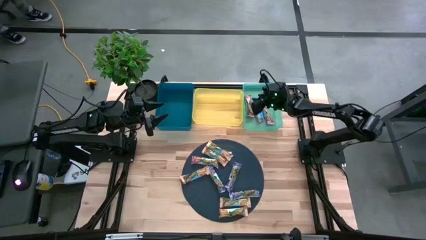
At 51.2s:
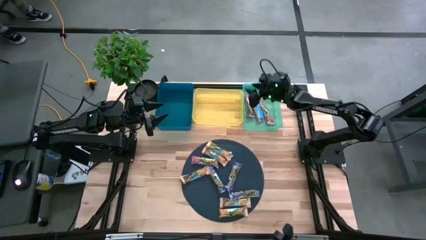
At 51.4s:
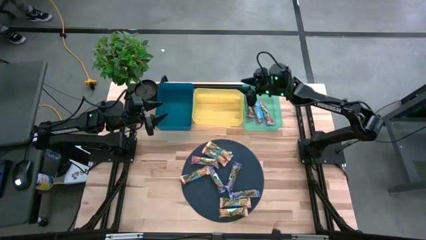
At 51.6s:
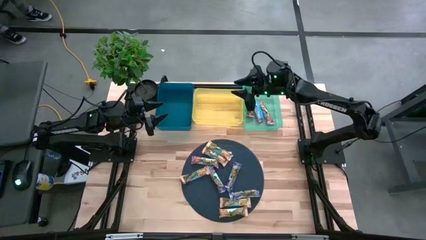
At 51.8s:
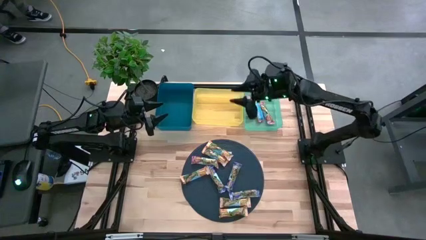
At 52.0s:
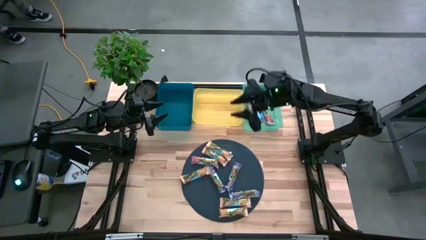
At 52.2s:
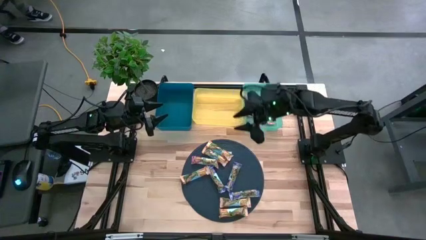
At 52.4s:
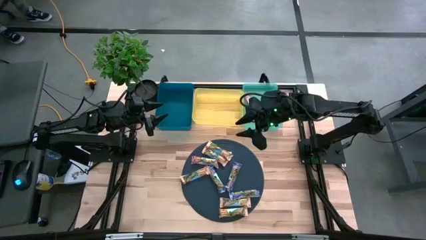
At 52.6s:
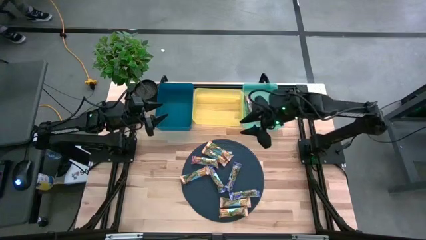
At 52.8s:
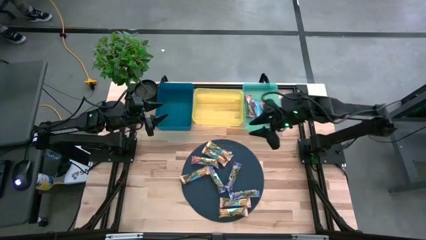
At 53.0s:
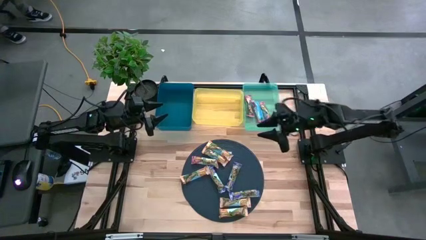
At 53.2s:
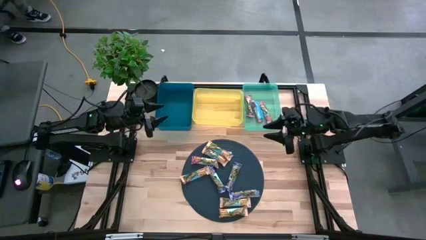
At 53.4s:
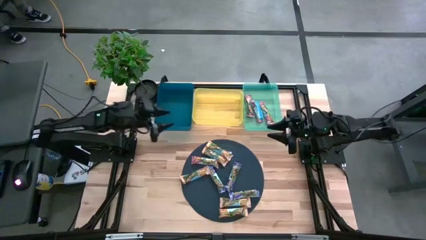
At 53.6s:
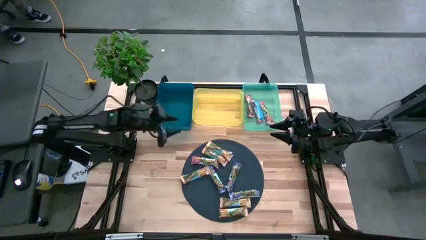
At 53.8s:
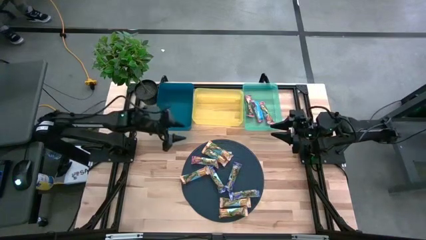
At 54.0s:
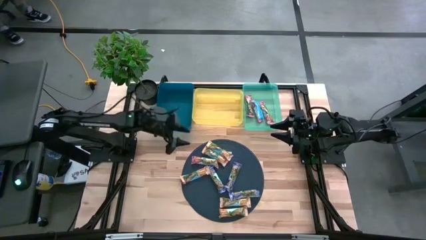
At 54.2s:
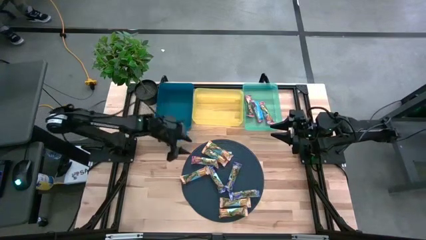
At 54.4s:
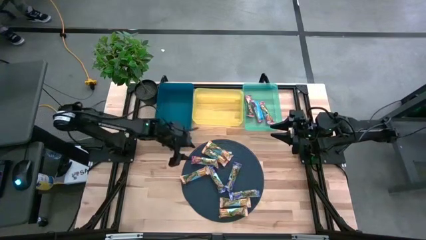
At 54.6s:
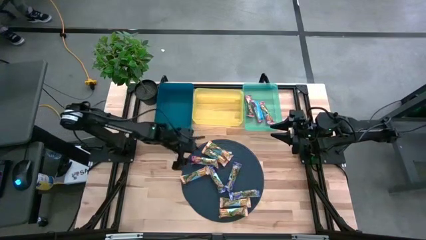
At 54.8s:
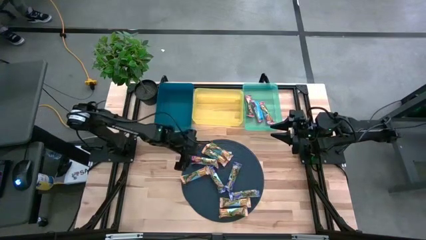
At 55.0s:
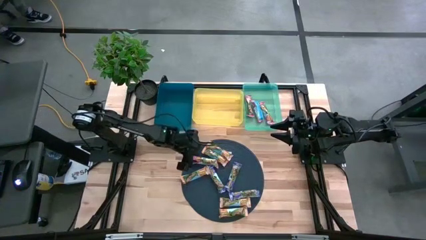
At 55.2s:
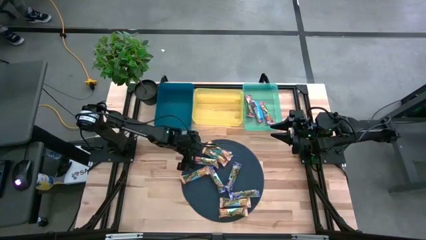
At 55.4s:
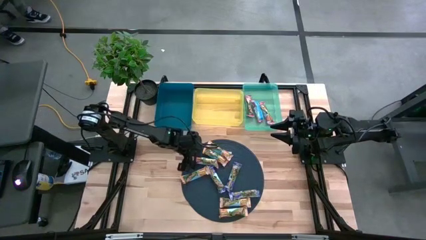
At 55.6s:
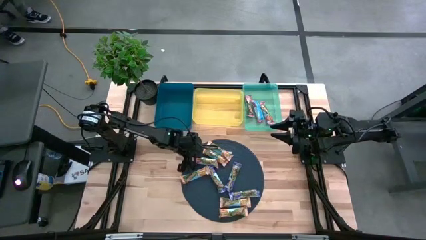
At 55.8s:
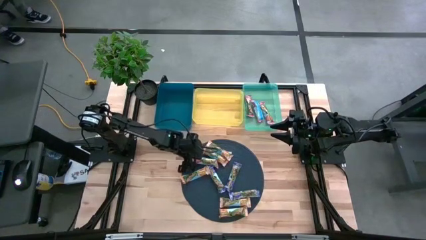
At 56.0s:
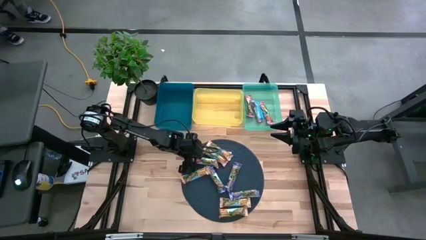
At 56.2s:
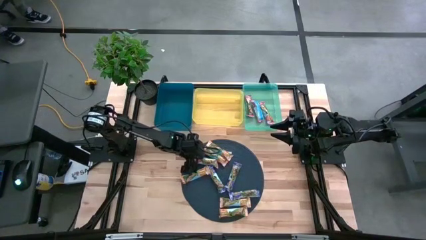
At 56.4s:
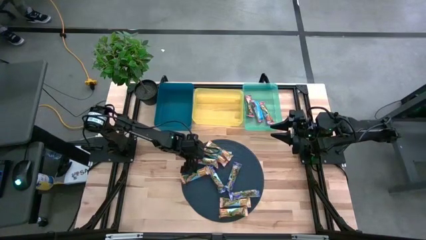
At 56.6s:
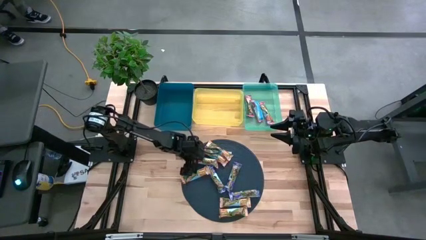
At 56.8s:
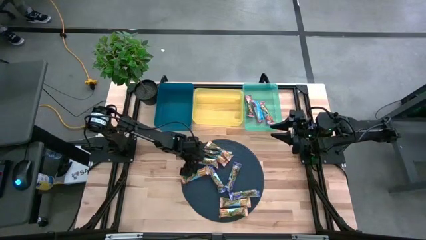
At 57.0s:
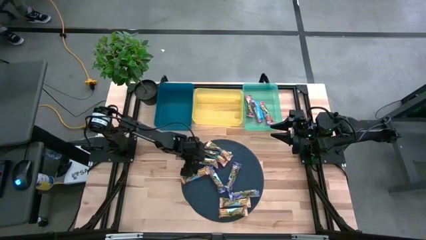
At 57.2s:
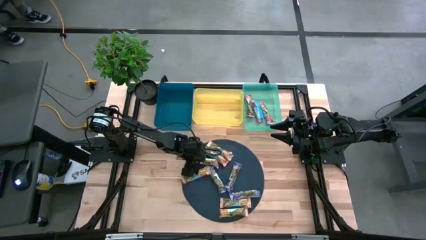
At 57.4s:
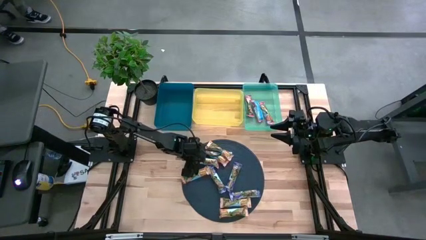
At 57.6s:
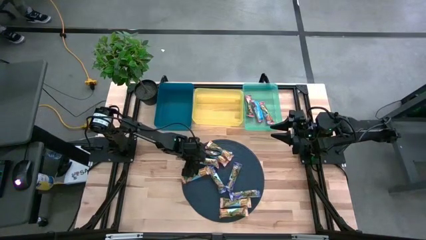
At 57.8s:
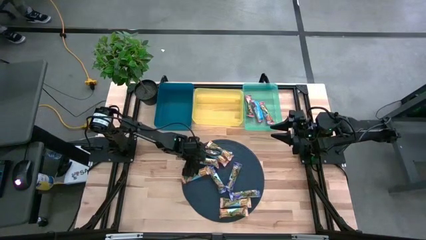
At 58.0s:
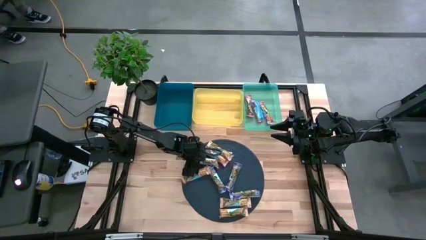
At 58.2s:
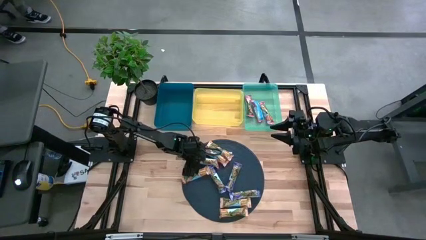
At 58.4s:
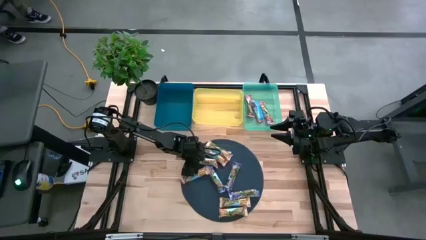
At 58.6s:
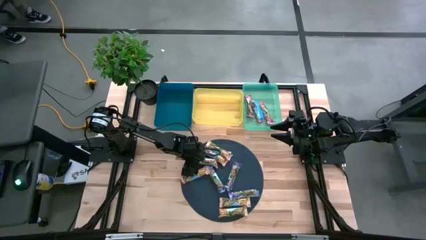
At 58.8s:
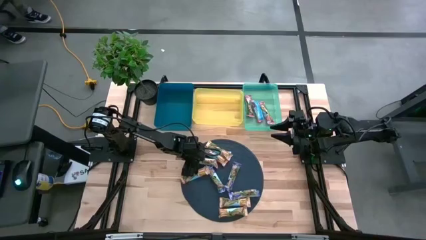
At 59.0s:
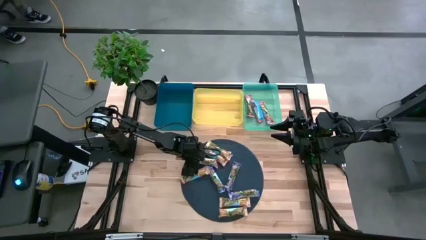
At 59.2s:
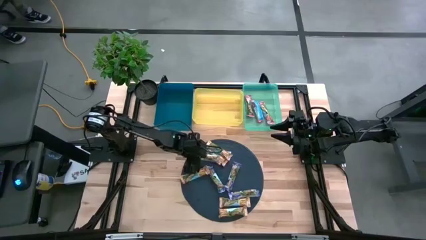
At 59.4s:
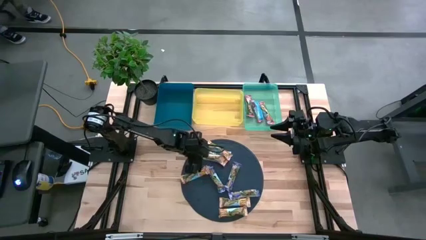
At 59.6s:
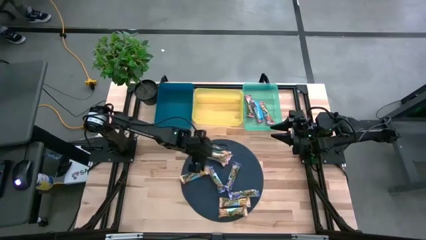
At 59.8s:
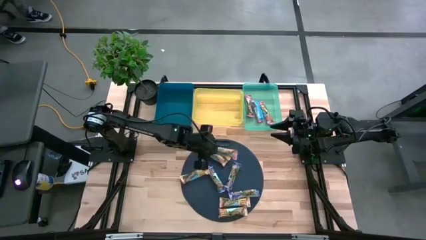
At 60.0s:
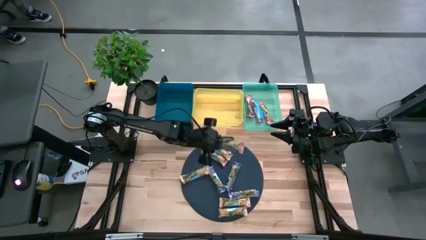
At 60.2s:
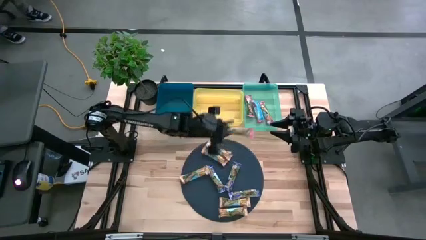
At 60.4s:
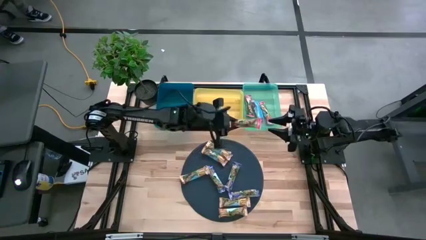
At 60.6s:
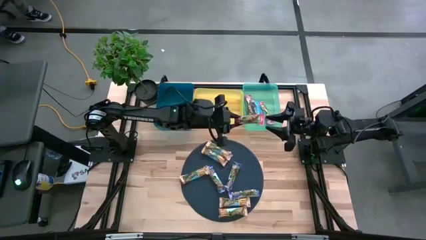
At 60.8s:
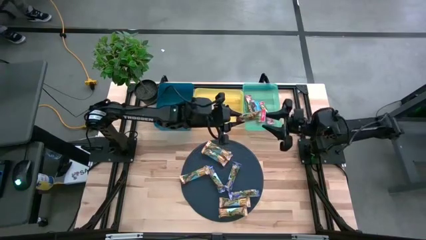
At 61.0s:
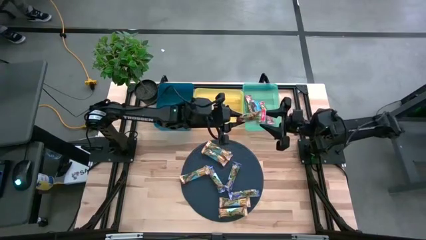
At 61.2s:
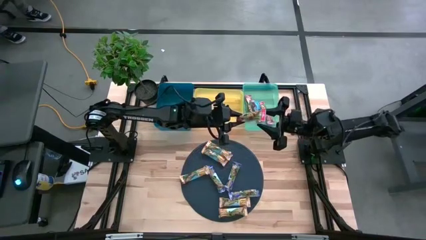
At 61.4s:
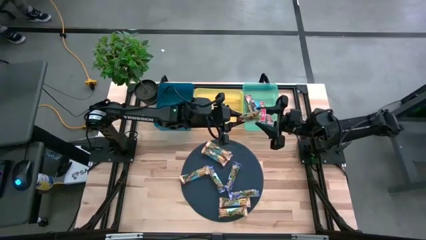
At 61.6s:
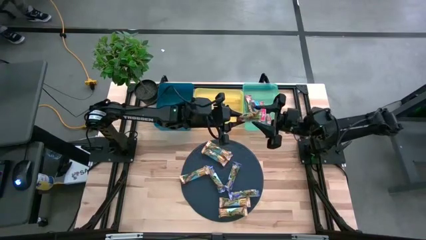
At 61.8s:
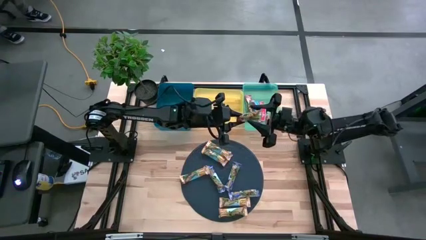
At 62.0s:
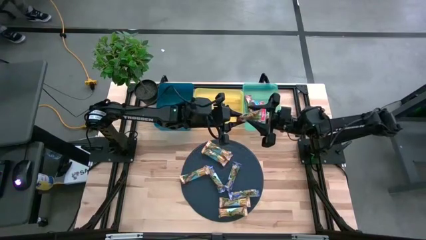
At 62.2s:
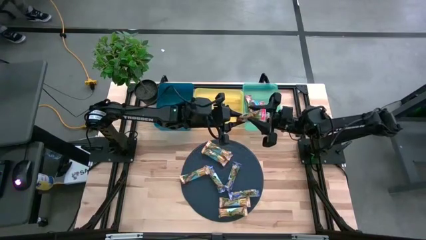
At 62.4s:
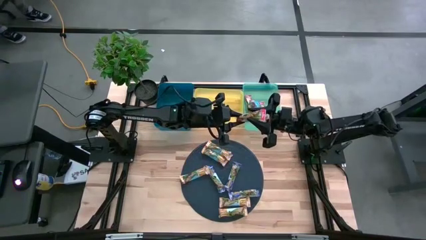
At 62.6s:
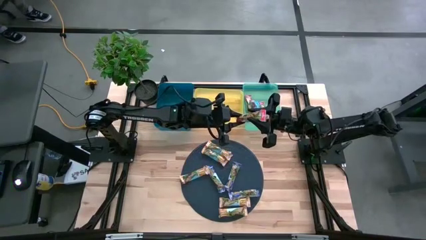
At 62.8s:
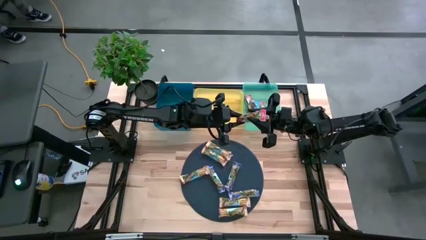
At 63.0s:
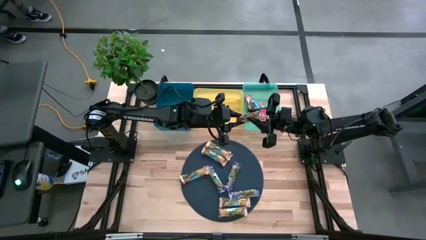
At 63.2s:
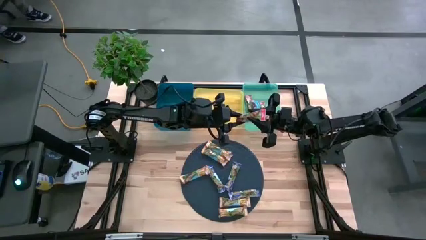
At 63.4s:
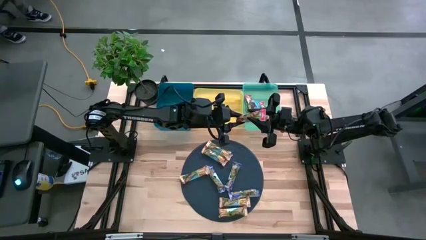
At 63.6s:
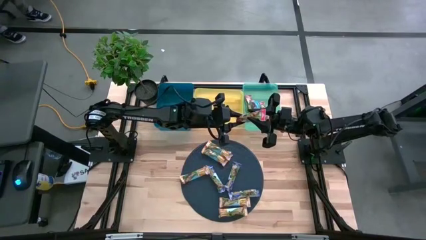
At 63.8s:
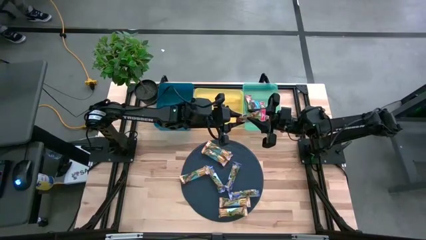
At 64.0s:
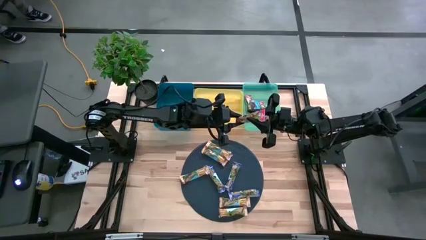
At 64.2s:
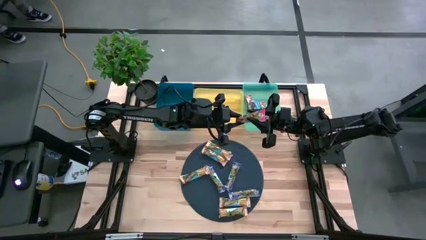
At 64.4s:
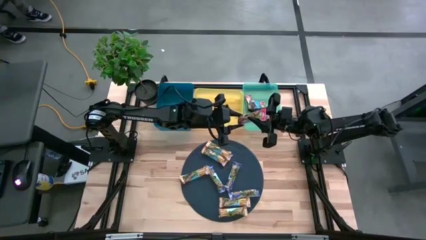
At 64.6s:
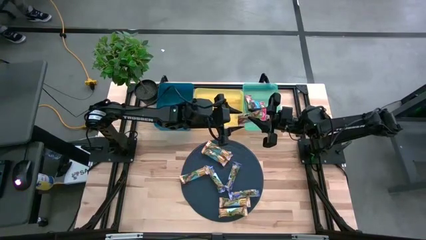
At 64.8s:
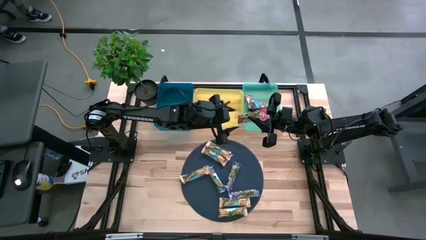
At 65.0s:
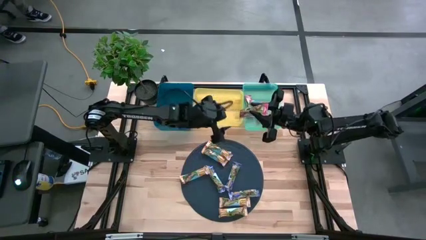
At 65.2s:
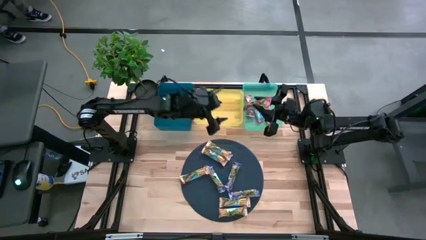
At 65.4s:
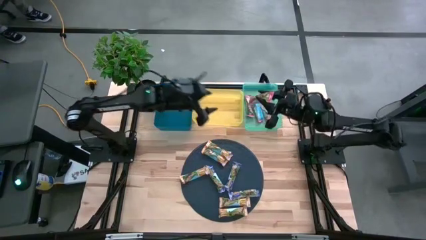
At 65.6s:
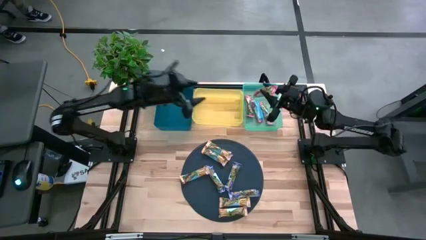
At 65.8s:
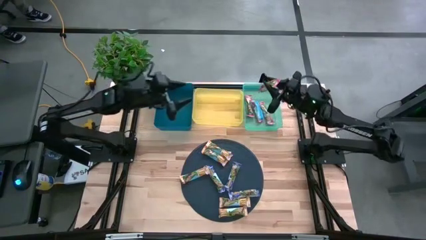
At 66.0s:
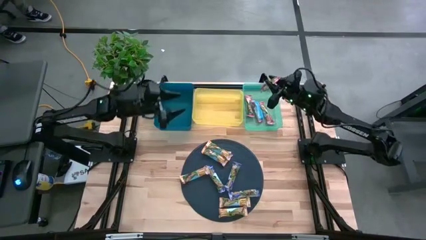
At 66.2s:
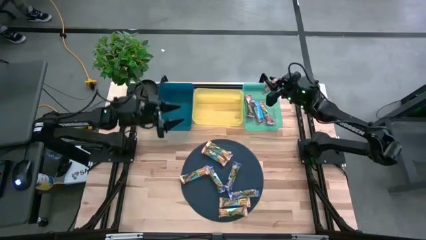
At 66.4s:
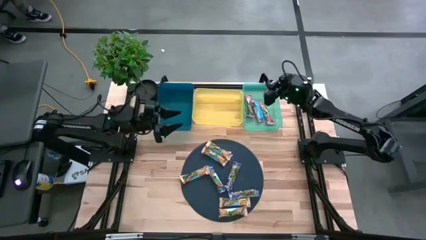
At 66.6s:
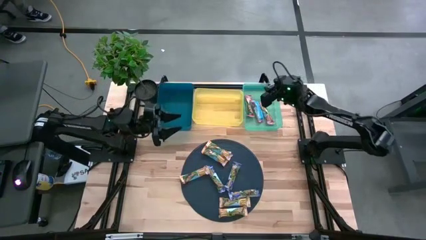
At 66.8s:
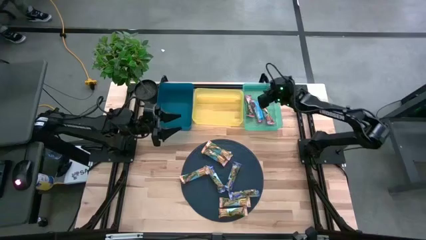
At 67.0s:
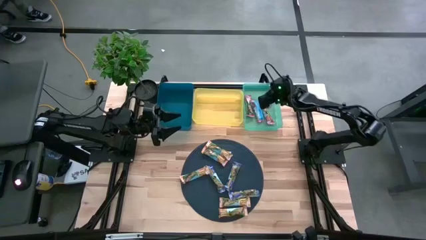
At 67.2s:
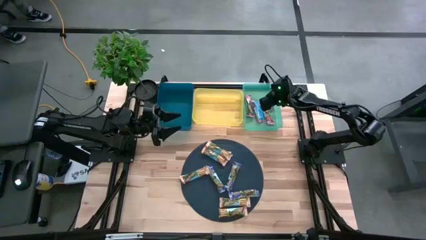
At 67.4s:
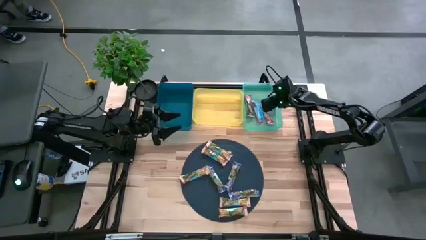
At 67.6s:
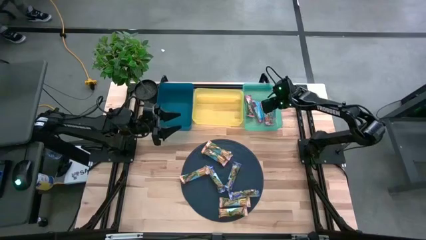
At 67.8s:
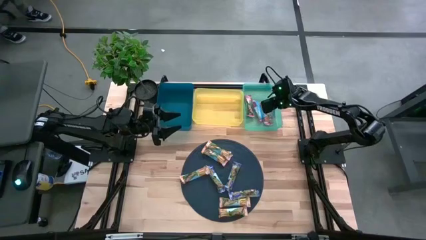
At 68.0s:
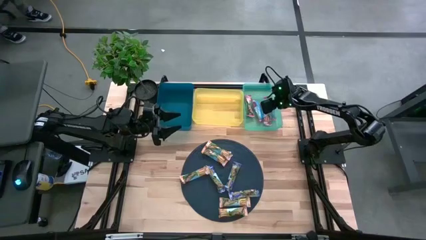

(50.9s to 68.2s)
Task: Pick and place Granola Bars by type
Put the red granola bar into the green bin
